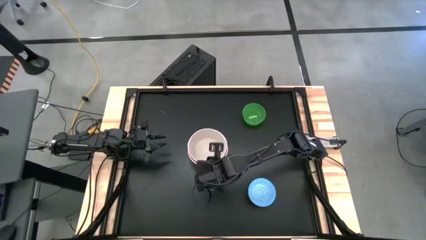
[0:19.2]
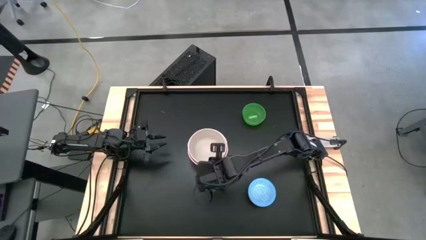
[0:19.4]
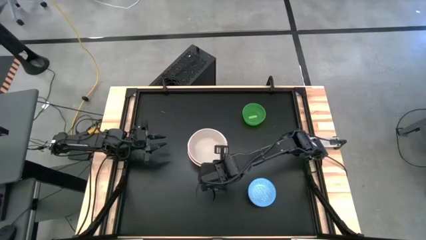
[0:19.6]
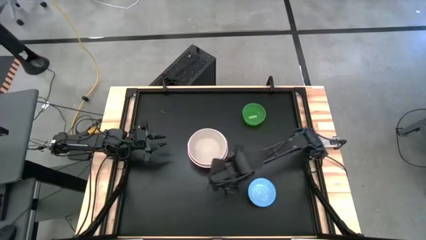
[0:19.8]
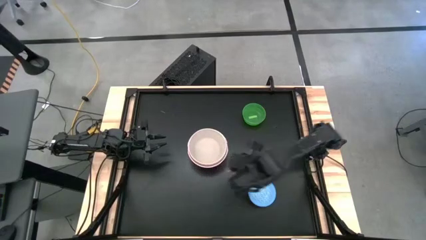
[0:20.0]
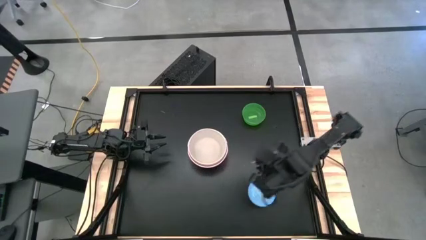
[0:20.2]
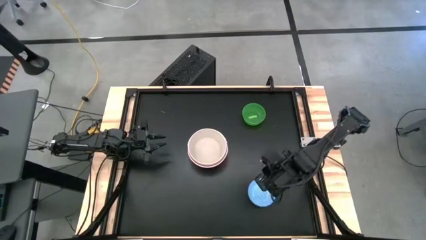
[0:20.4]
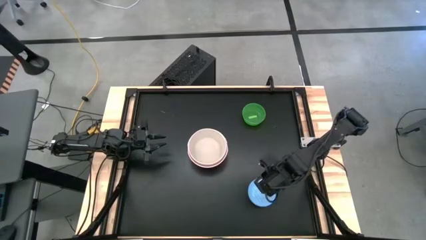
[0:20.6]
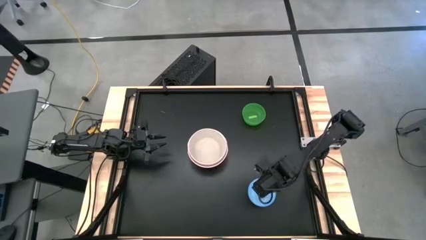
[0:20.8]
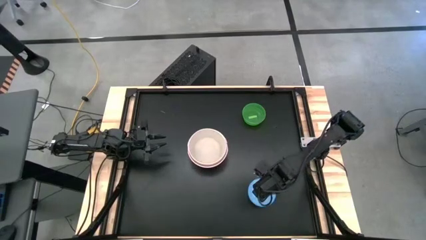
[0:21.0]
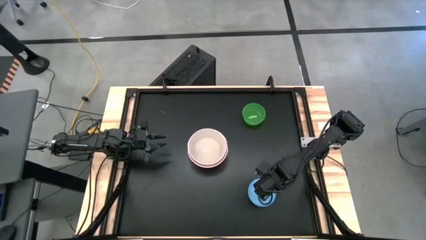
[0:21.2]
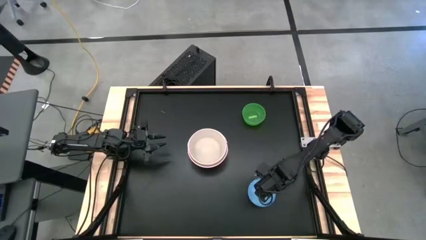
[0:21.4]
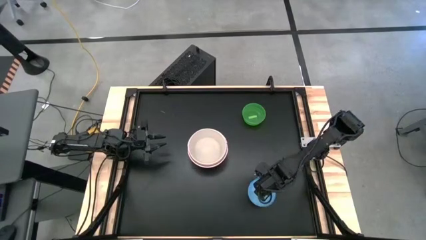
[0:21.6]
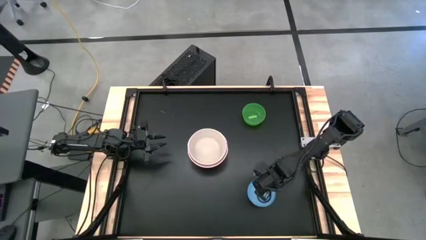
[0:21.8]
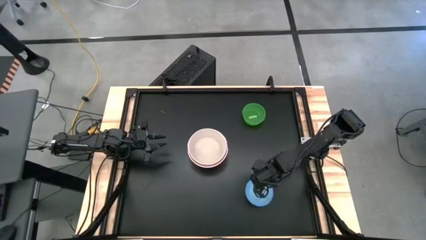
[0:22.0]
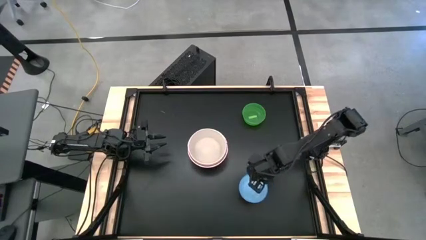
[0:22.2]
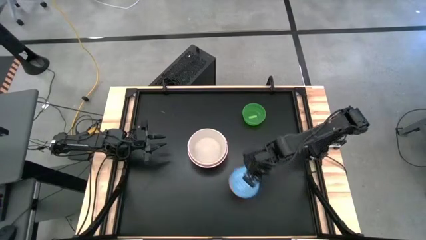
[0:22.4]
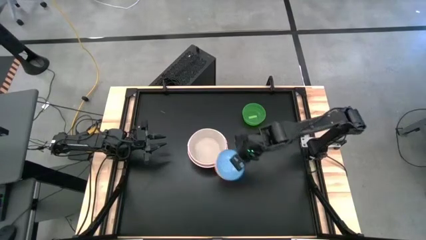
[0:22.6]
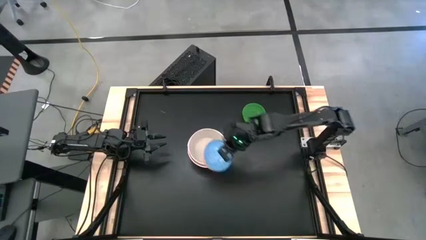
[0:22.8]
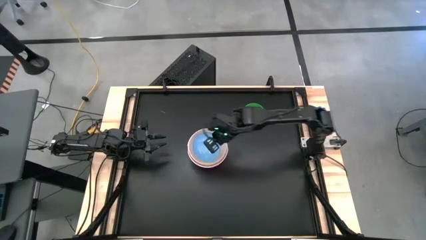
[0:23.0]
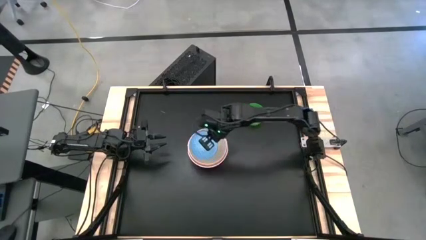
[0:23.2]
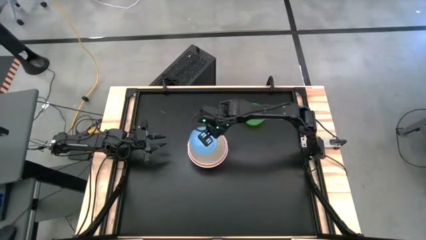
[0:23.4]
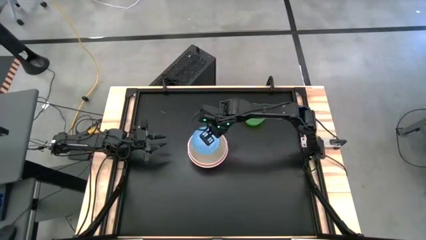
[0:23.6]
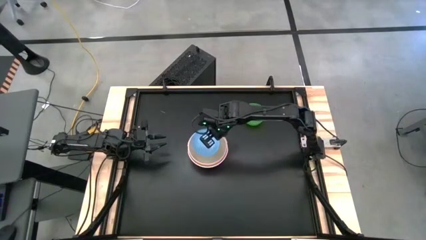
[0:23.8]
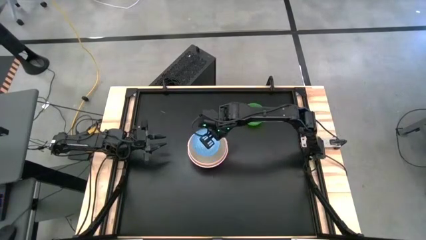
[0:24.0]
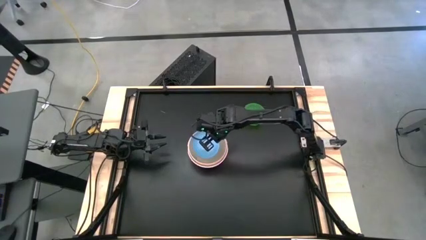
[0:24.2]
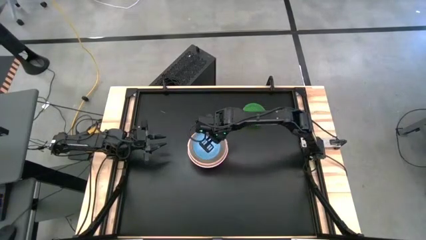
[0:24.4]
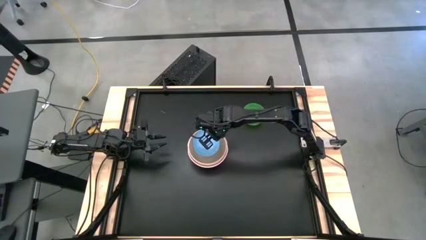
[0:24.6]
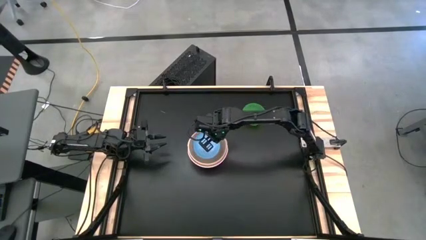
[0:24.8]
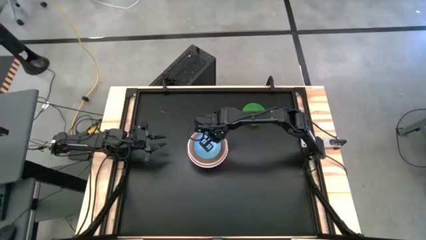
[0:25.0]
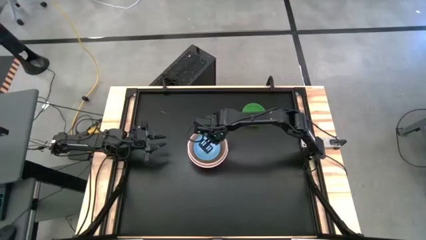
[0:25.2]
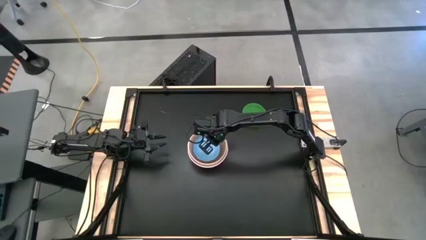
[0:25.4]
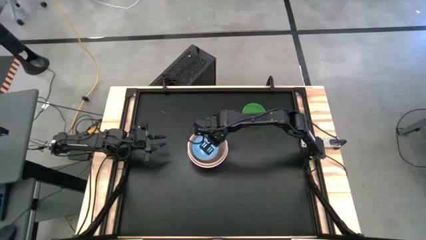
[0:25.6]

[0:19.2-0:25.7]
Stack the blue bowl on the grey bowl

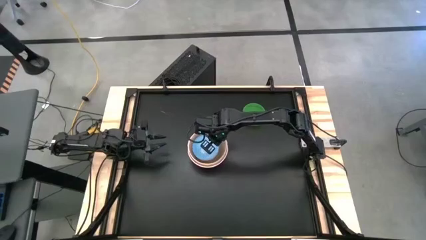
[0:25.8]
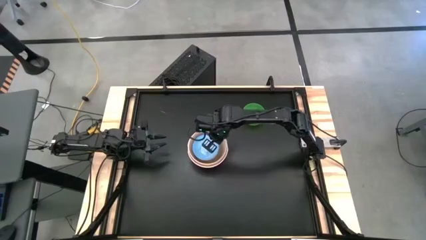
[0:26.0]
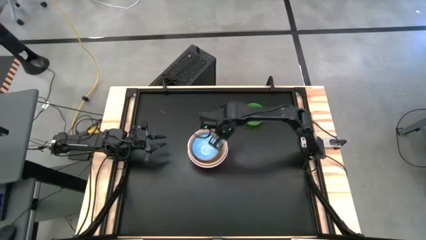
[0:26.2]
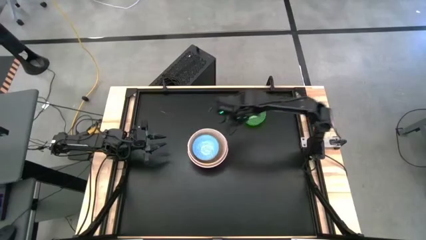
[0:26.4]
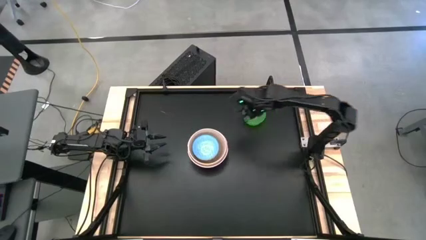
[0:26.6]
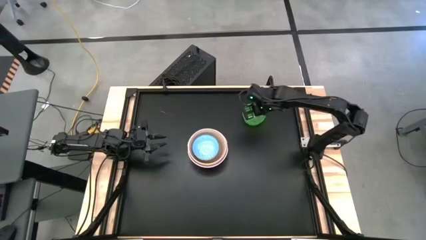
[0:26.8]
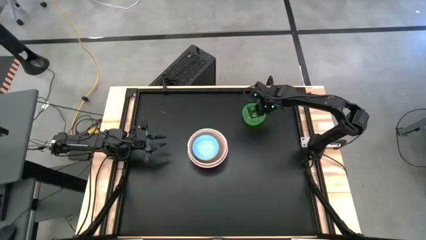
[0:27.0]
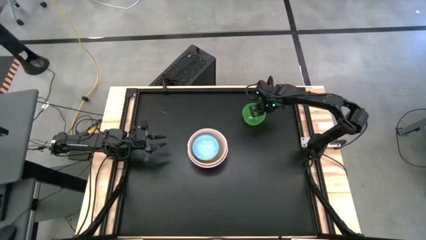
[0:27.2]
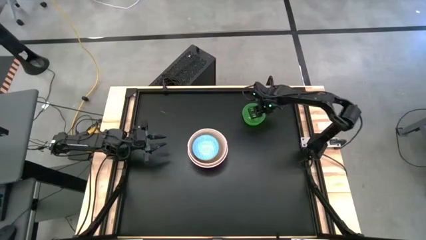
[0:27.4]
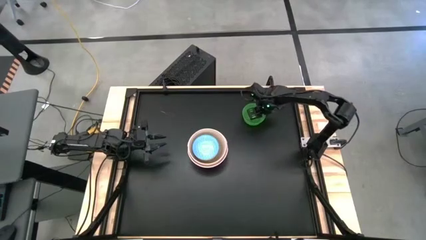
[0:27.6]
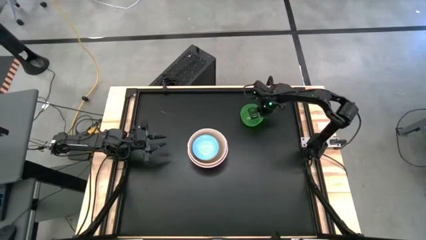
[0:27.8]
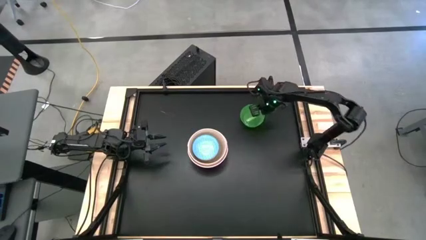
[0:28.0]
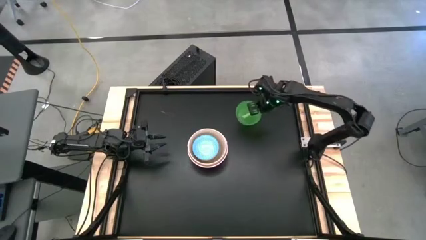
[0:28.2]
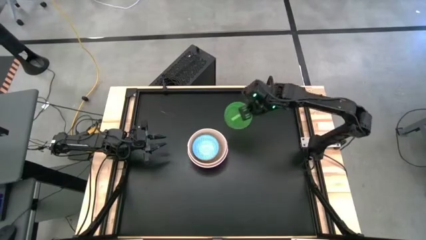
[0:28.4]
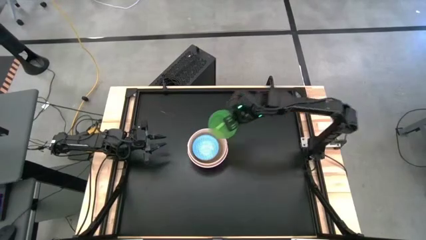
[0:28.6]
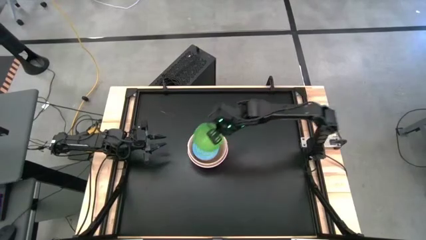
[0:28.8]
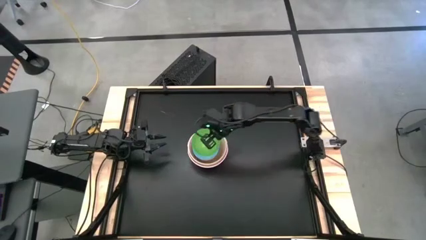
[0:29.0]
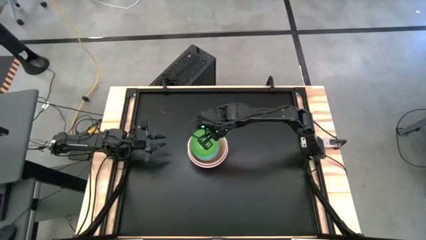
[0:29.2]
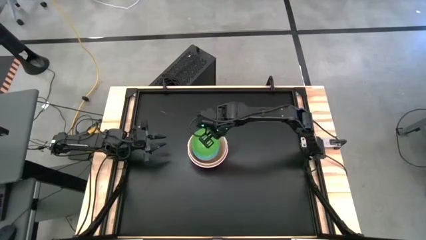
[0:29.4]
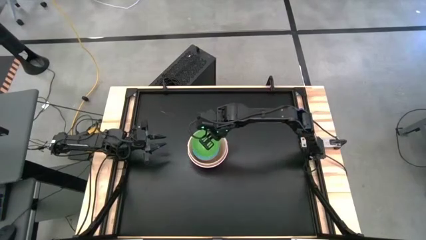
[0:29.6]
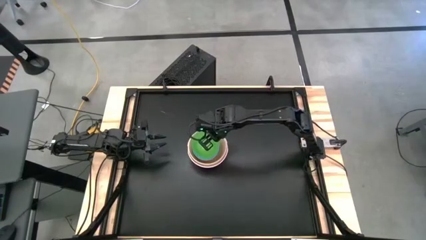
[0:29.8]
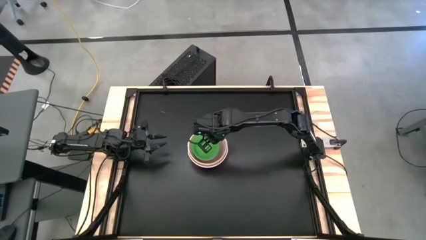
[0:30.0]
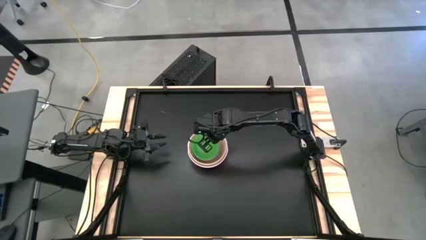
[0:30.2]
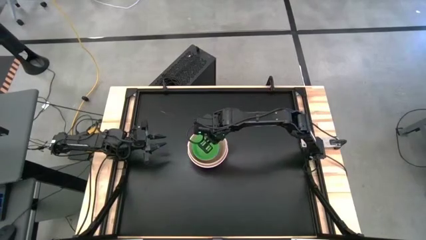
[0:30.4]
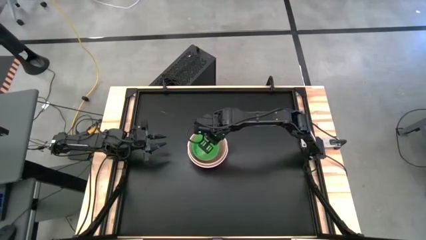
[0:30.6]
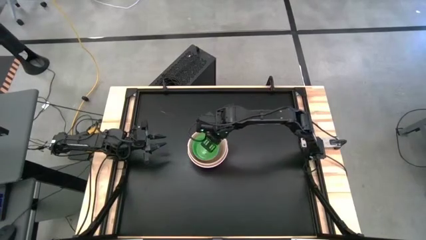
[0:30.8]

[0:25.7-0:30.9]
Stack the green bowl on the blue bowl

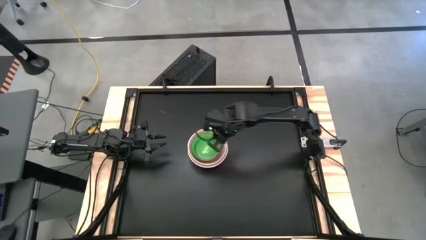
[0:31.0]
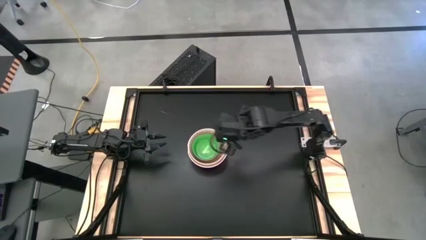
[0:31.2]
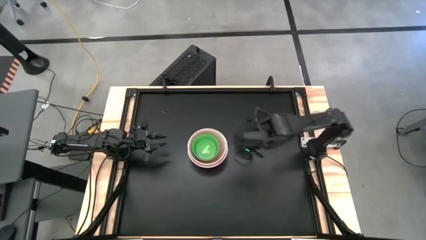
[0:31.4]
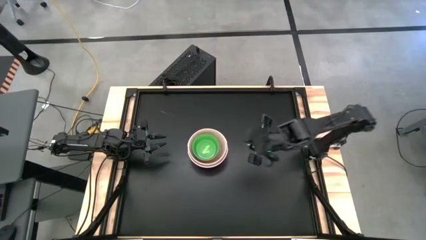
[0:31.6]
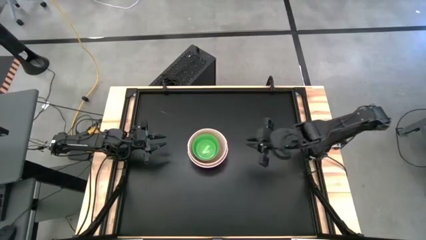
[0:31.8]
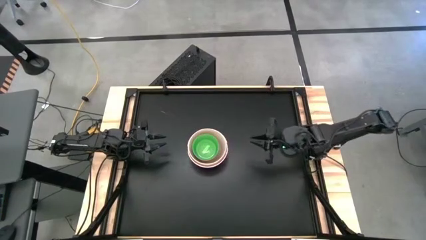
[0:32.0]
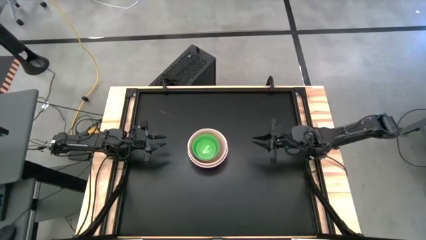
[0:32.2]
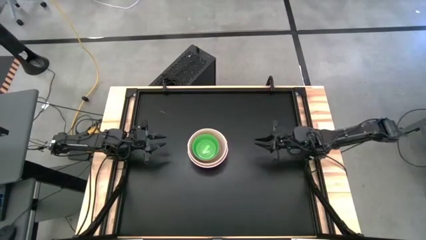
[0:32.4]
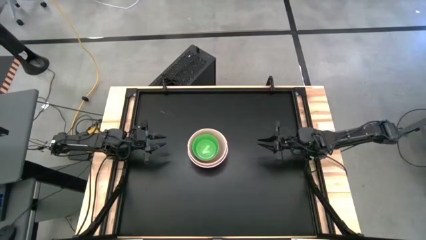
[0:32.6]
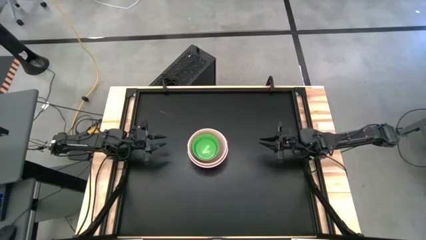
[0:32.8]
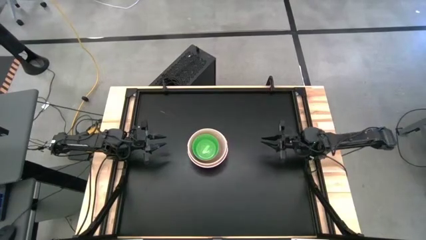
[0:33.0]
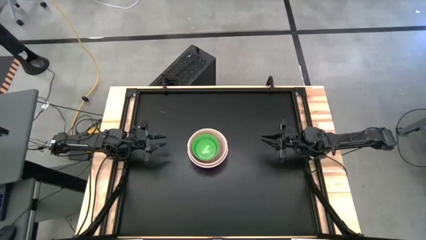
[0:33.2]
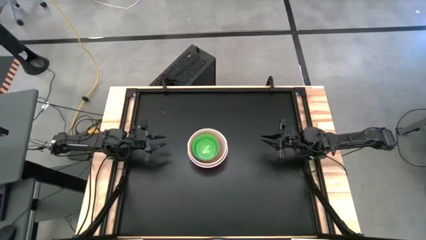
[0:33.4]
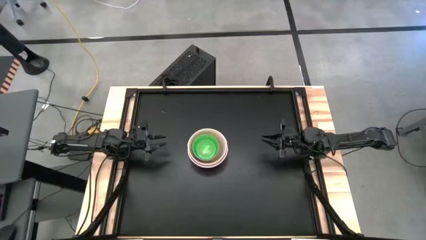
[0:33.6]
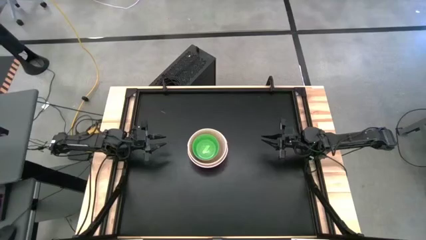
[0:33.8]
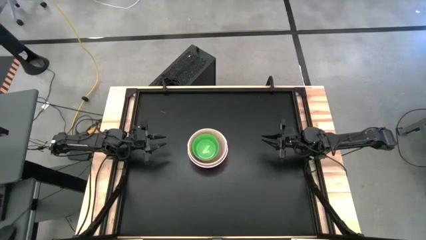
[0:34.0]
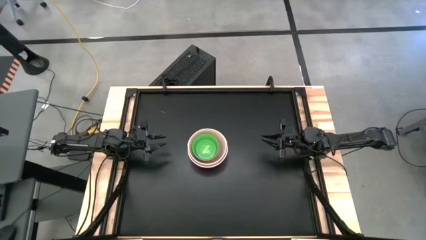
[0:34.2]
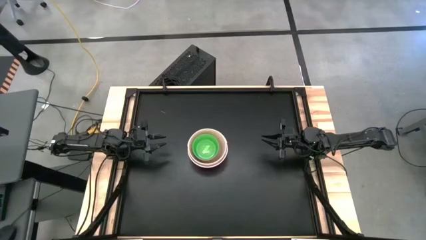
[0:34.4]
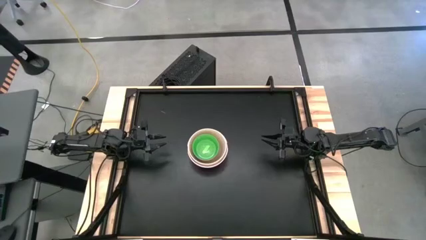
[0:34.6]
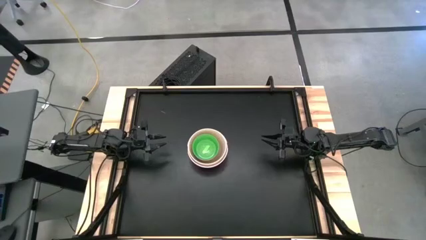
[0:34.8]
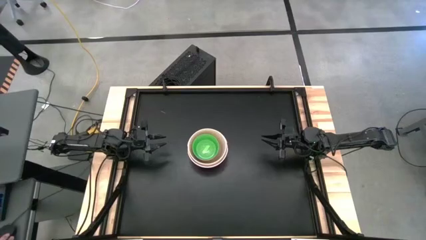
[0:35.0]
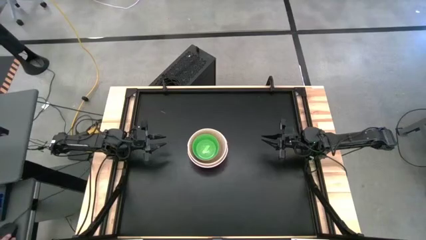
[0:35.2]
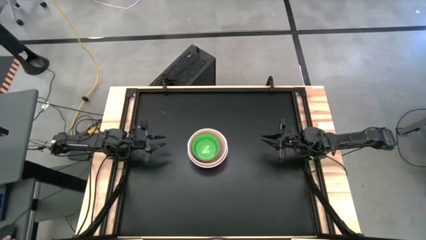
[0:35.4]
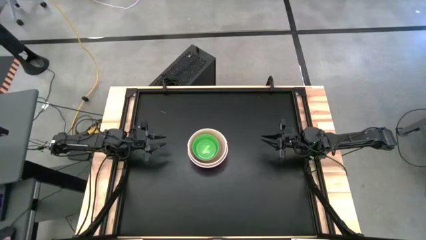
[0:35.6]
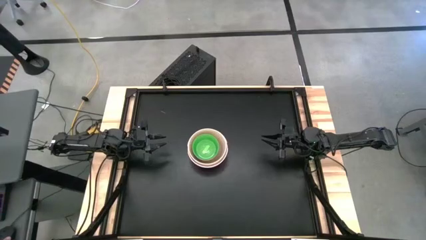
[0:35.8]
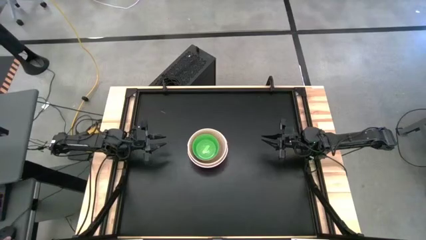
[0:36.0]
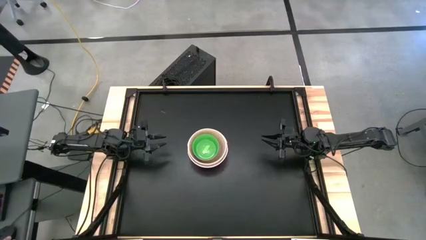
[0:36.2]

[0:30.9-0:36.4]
Return to Home Position
